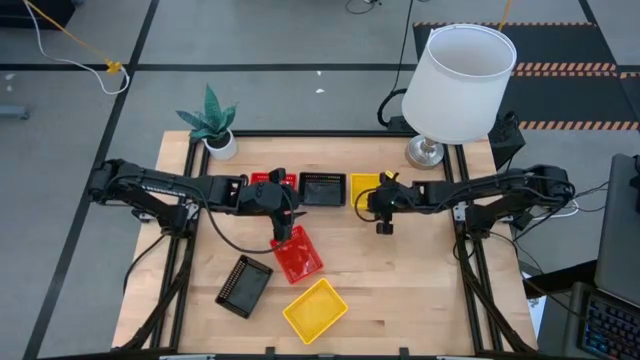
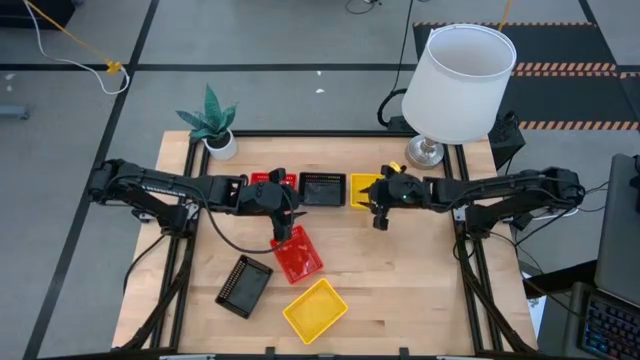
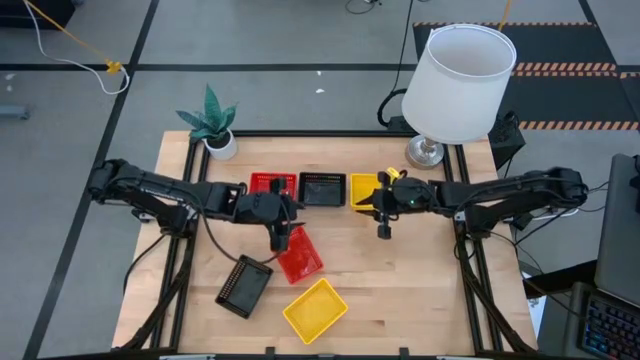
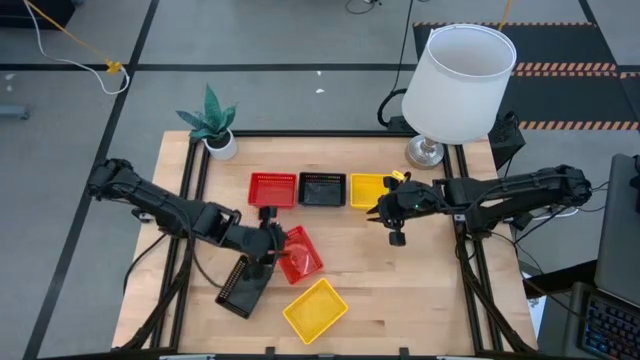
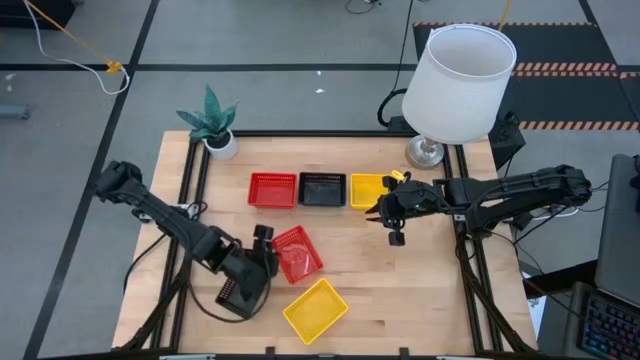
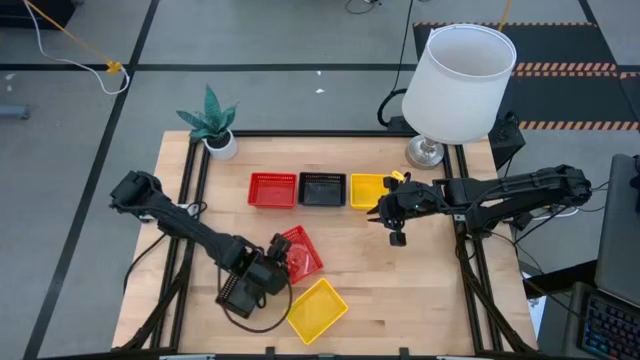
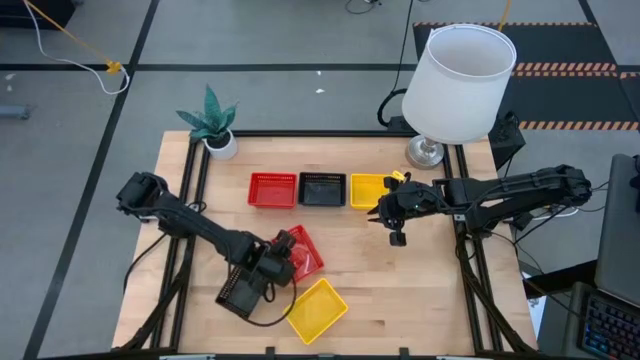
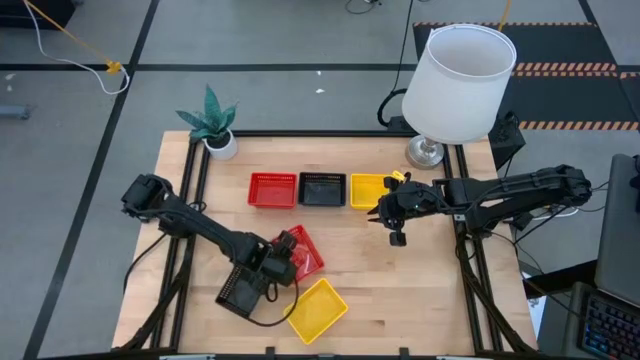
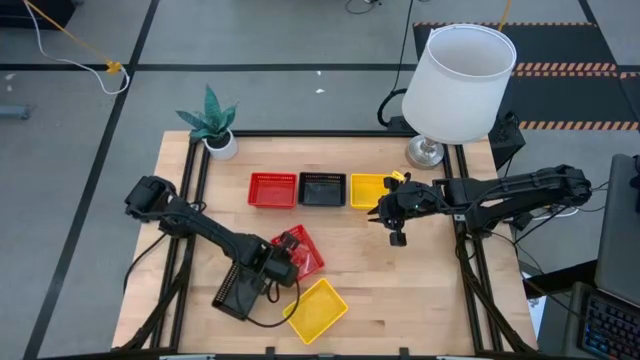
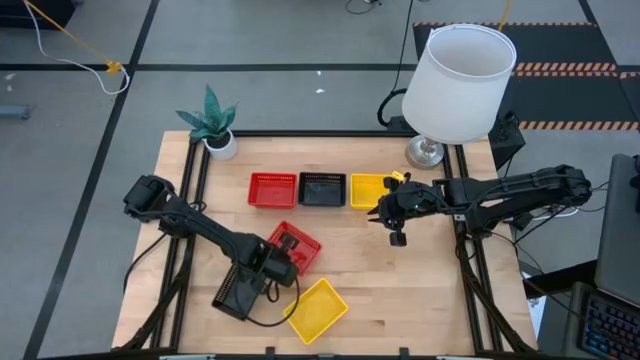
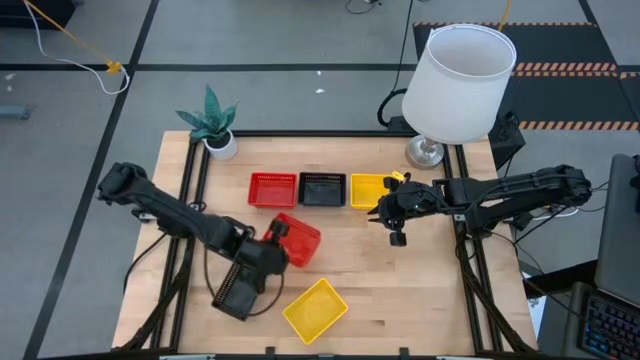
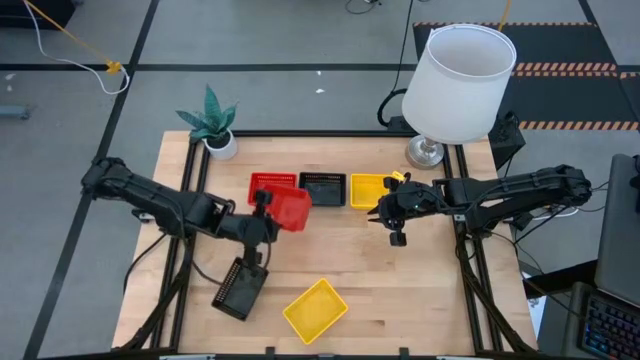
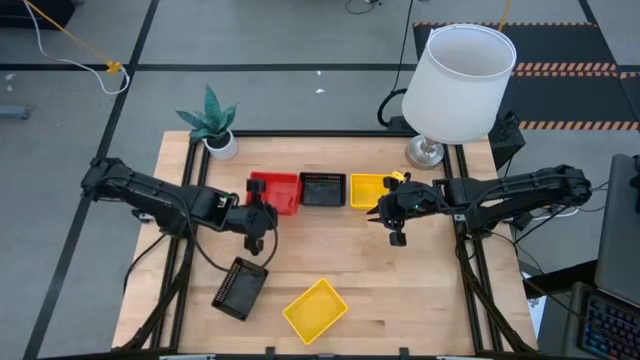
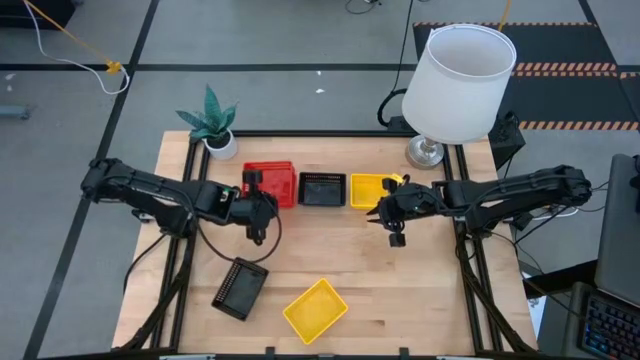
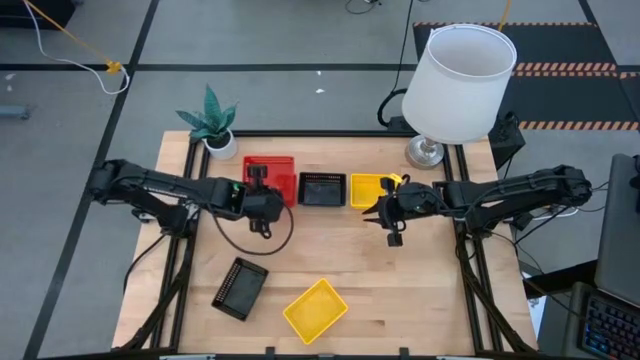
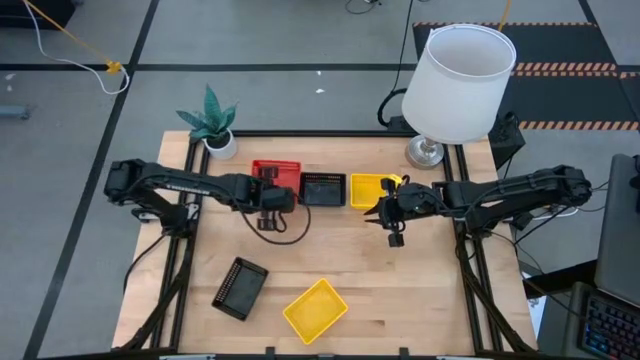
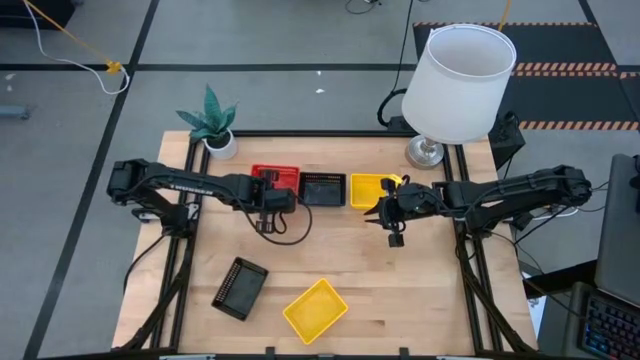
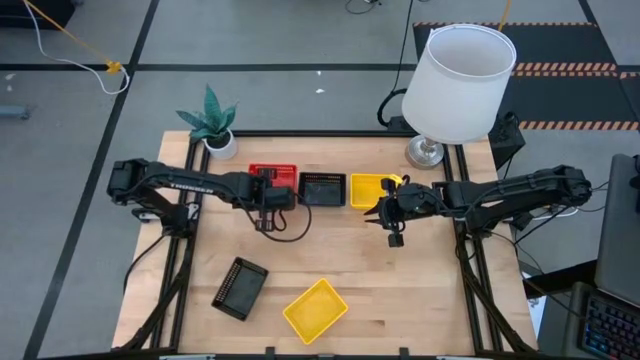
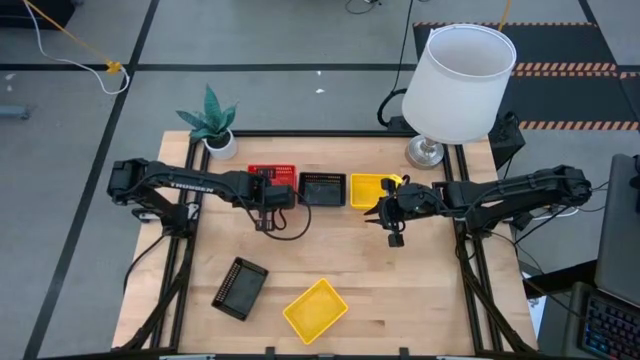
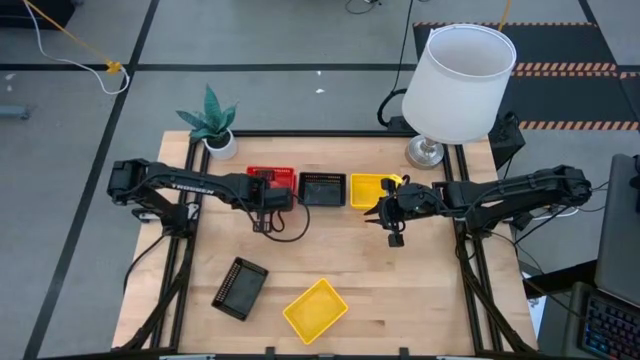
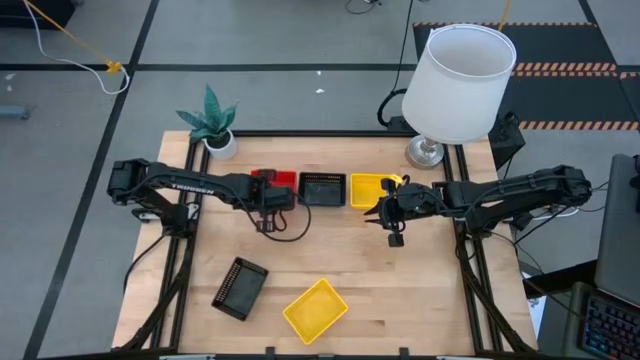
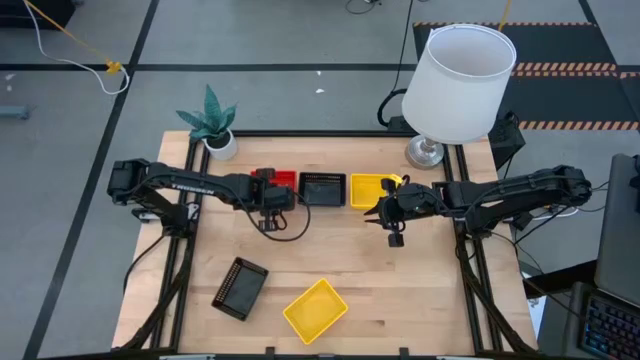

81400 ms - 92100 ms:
Stack the bottom red bin on top of the top red bin

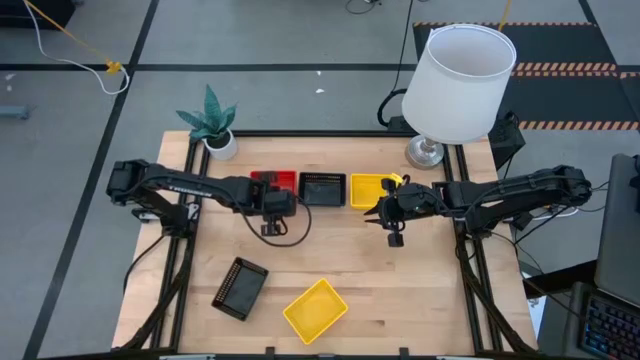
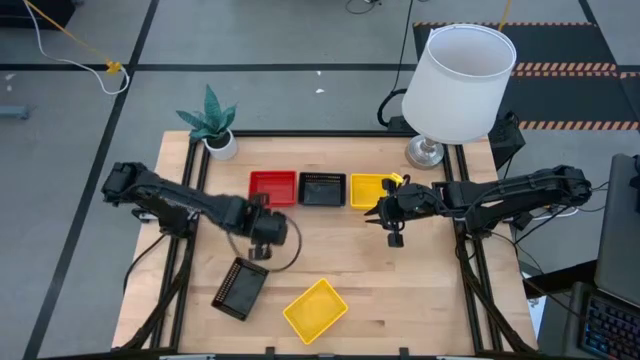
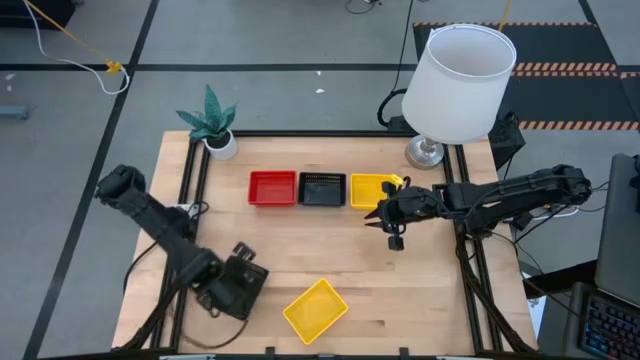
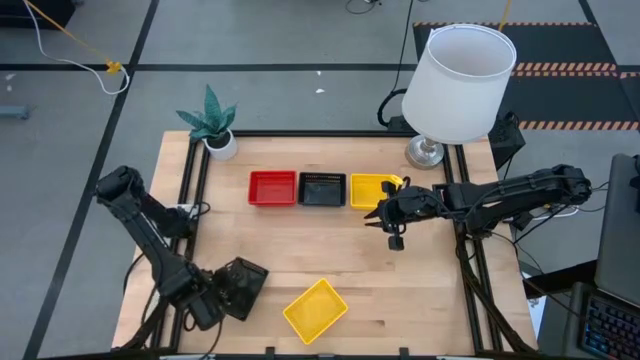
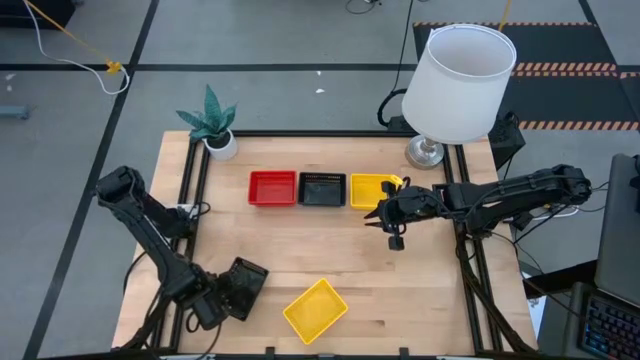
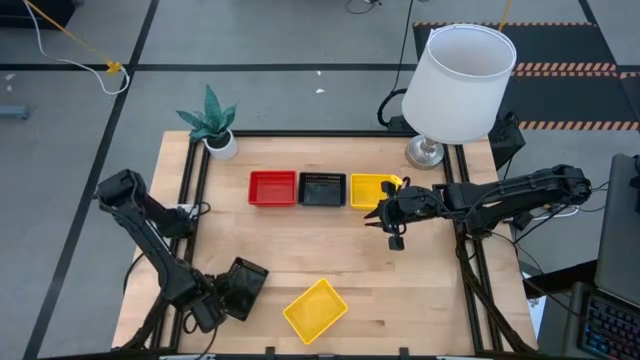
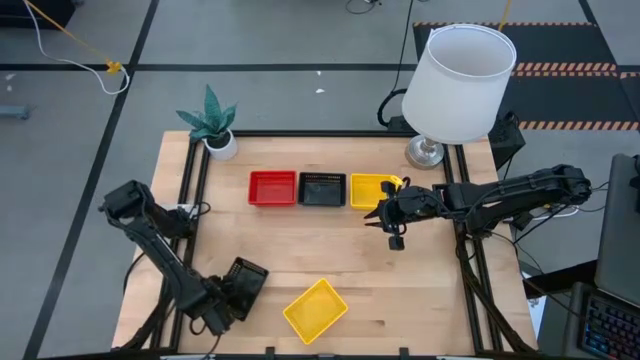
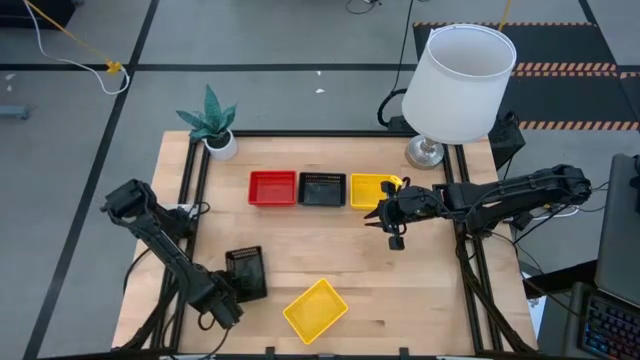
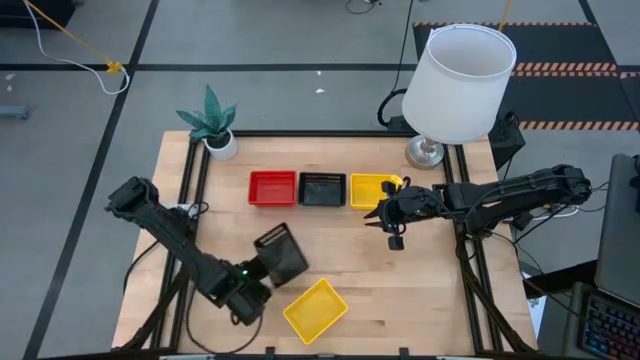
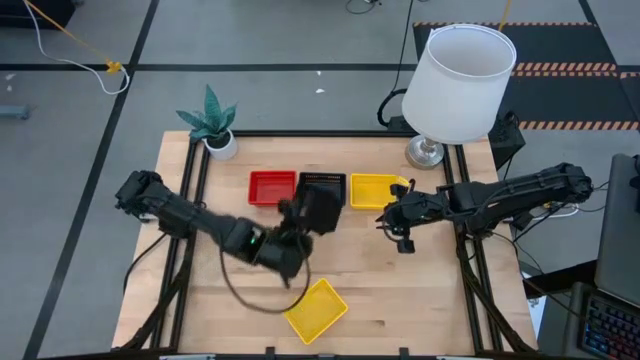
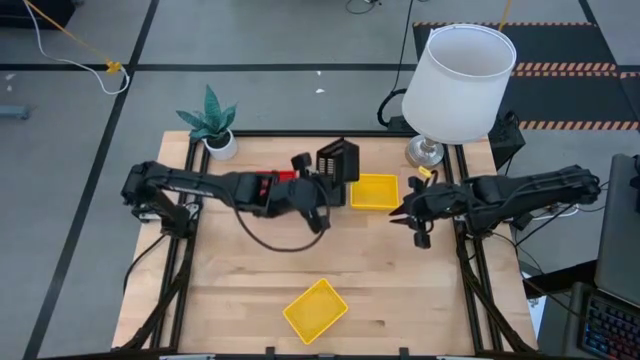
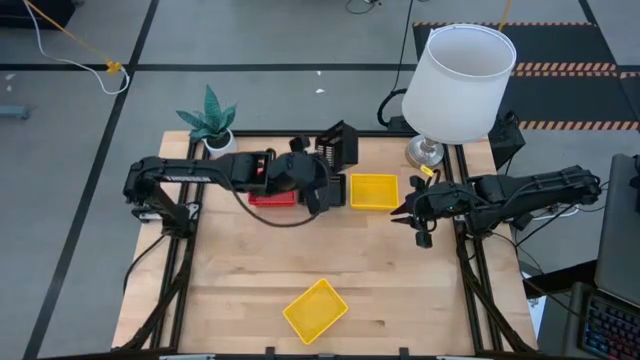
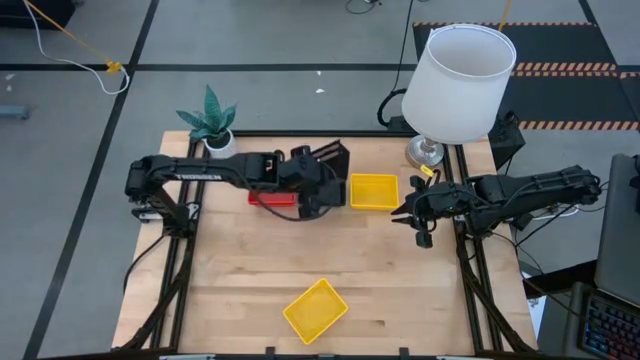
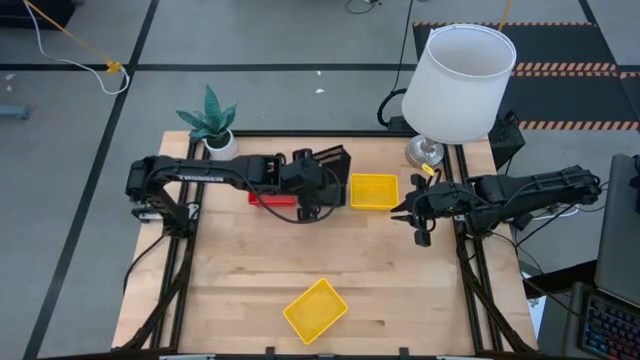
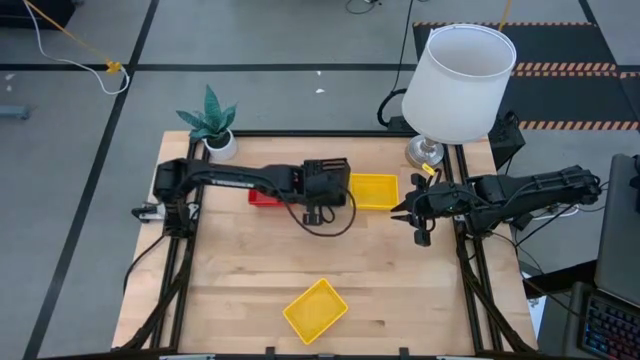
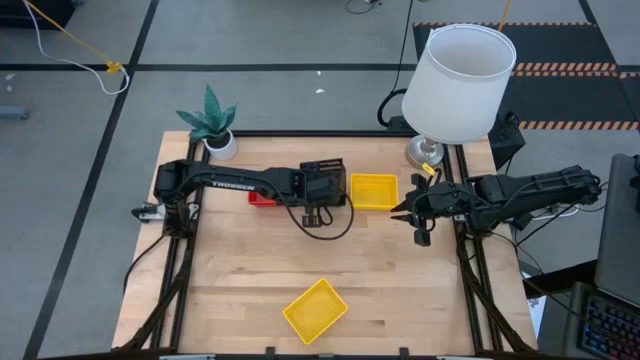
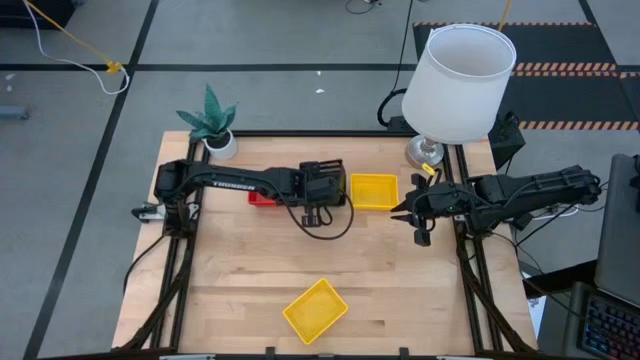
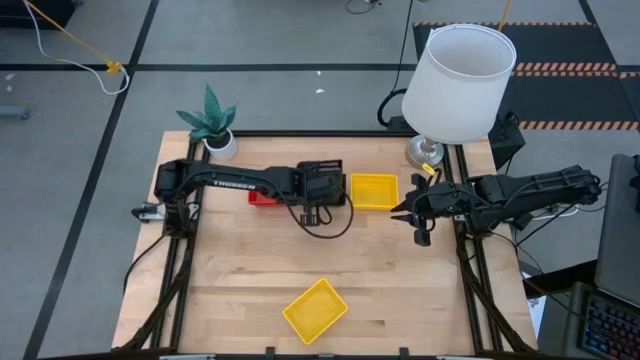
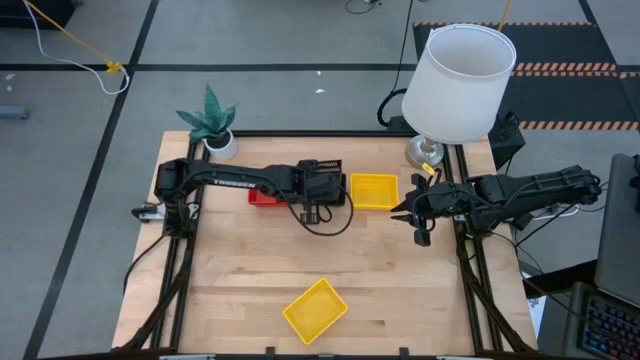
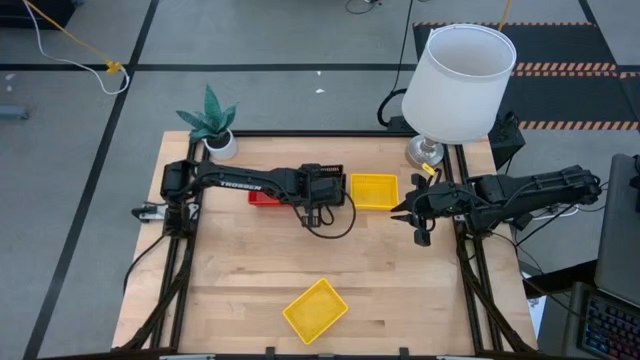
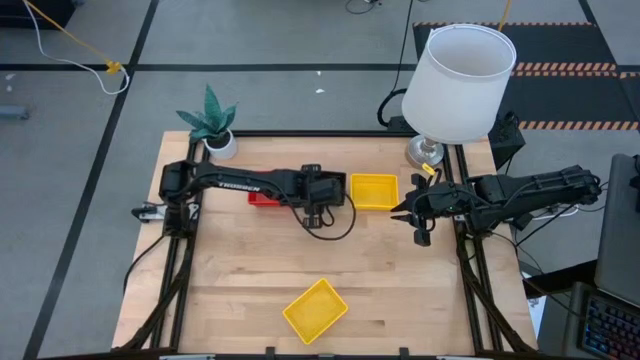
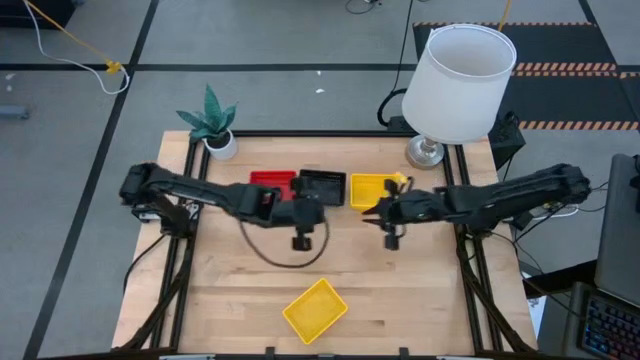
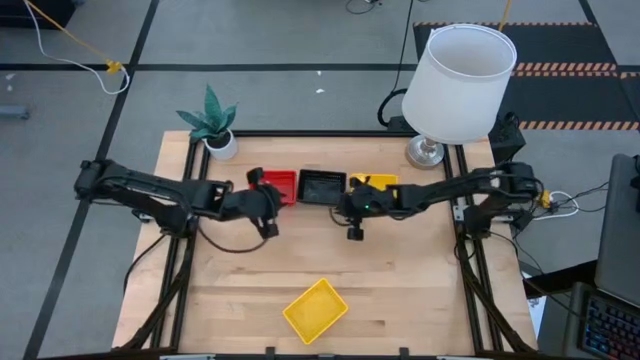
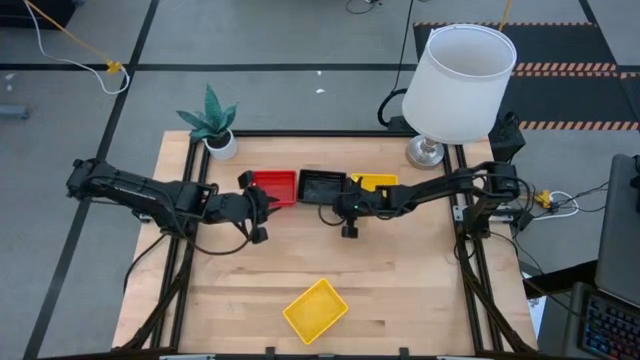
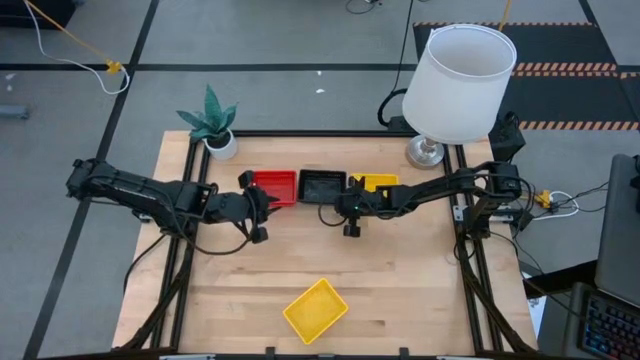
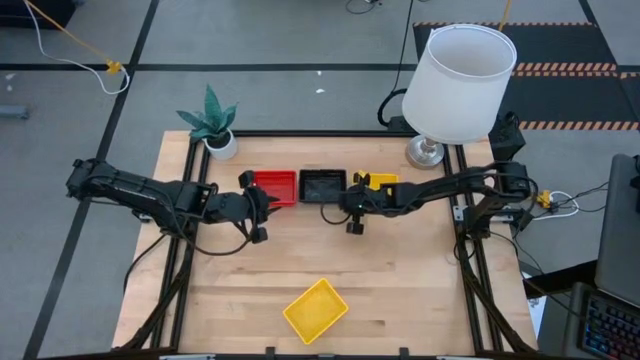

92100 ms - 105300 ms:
Stack the bottom black bin on top of the top black bin
